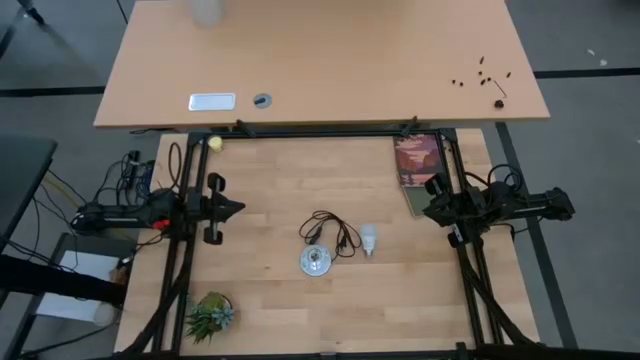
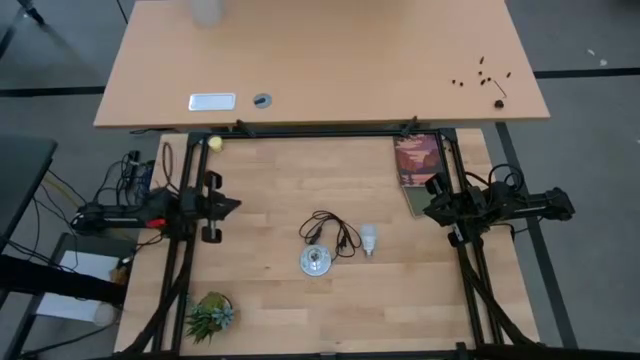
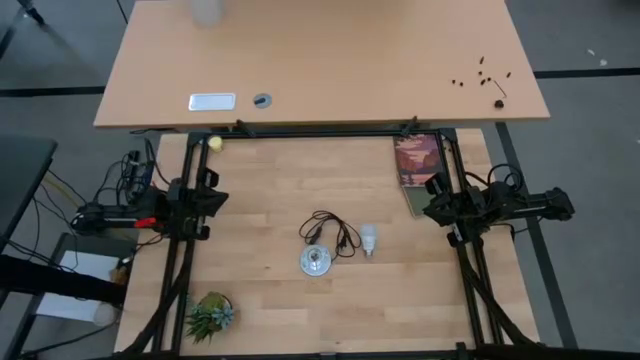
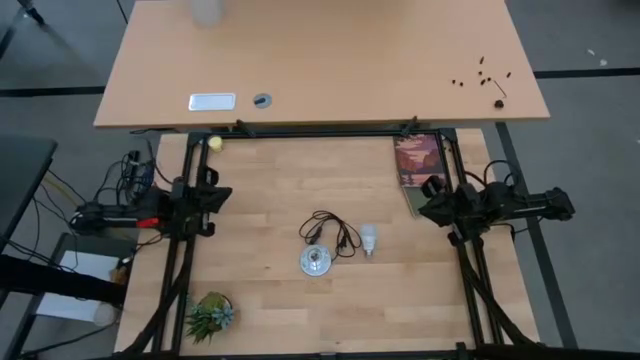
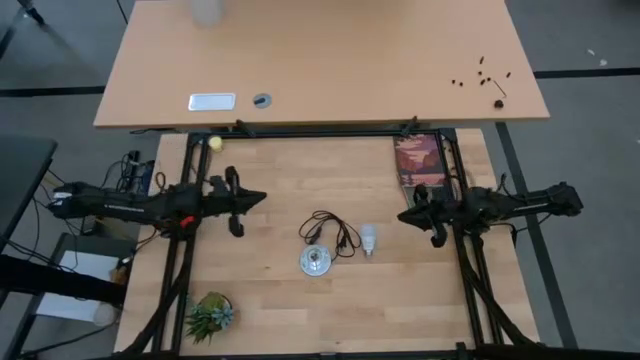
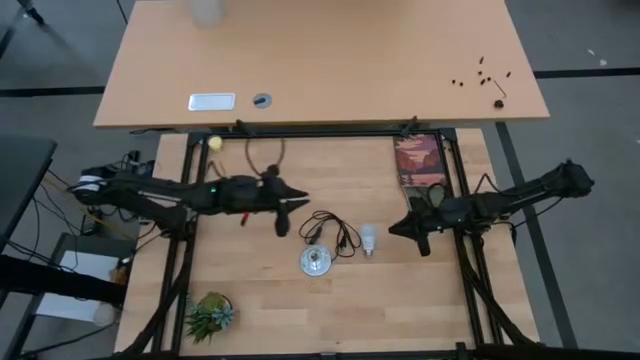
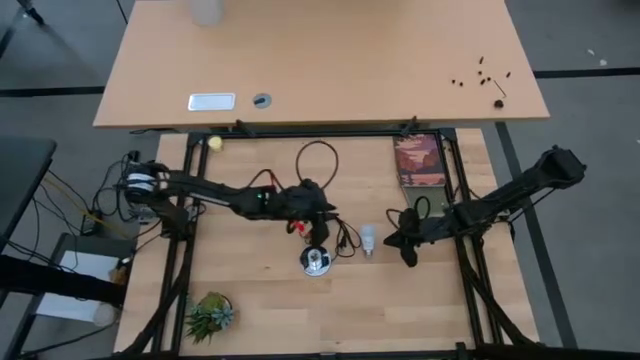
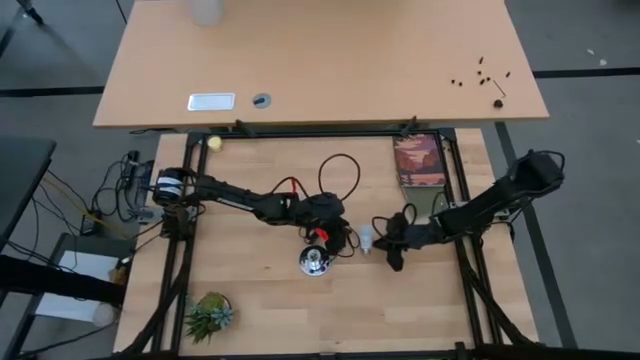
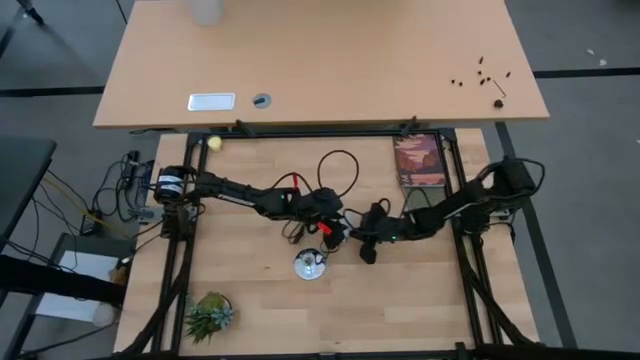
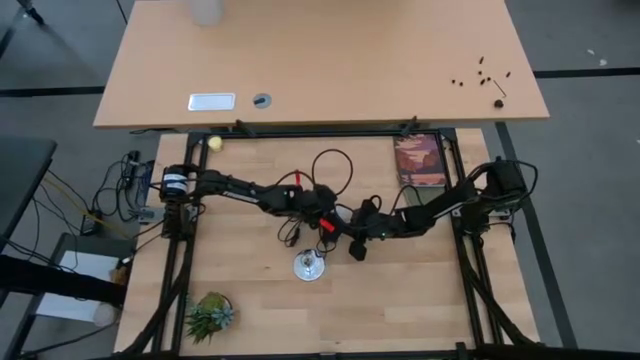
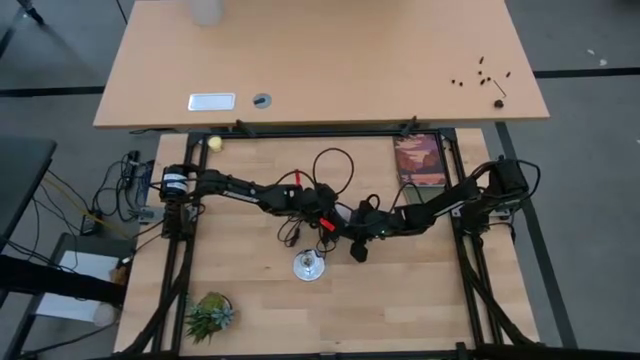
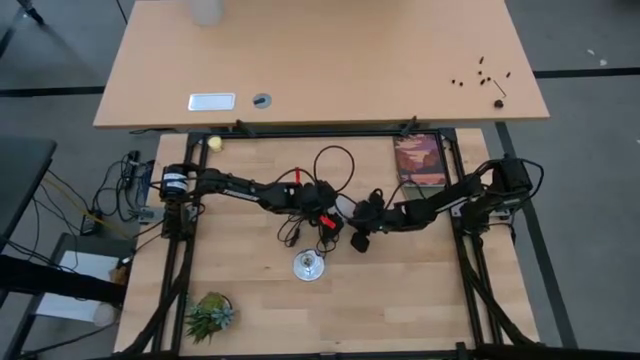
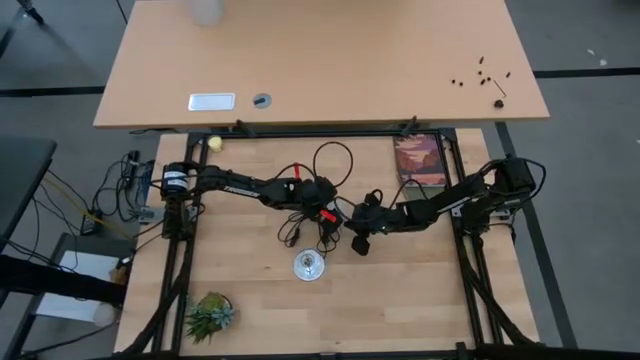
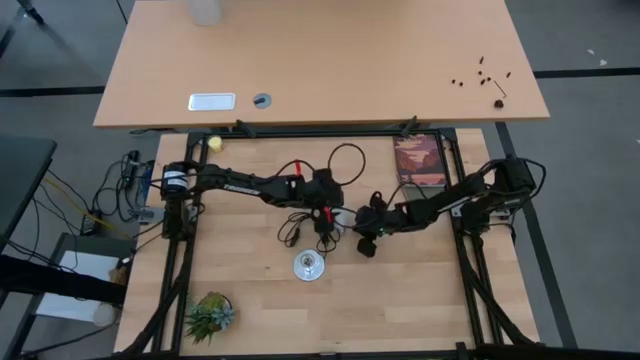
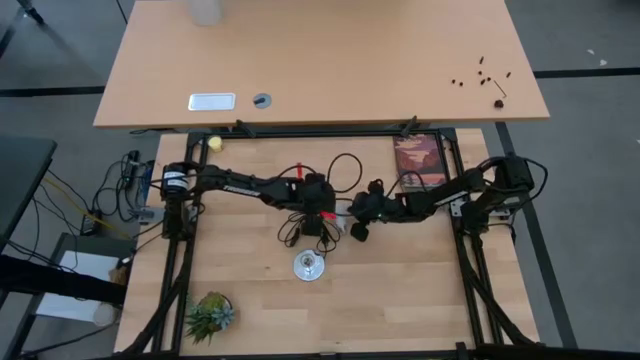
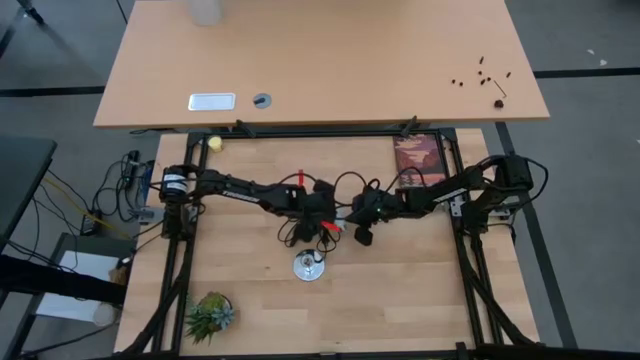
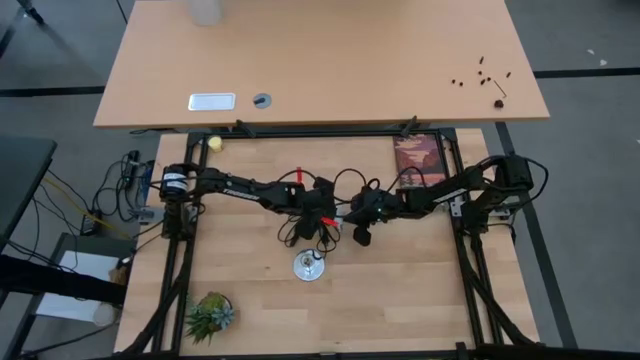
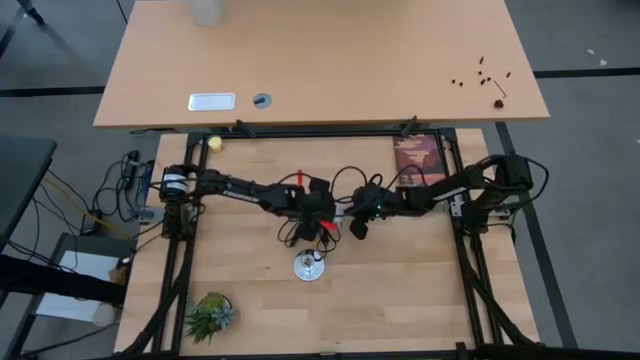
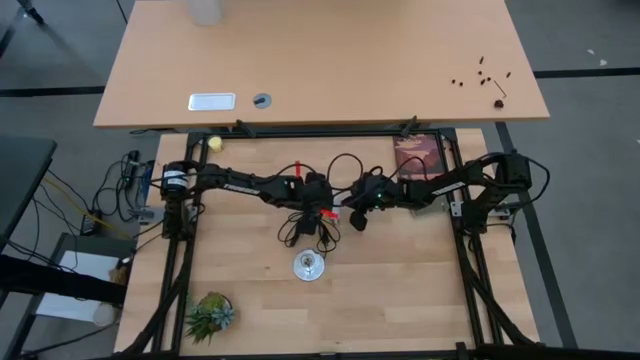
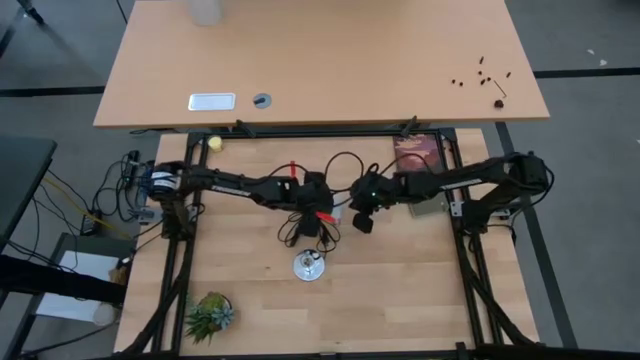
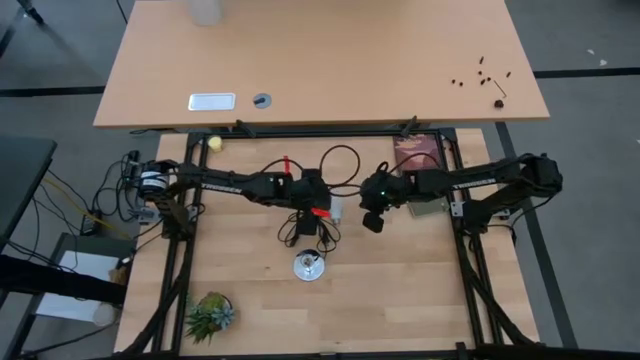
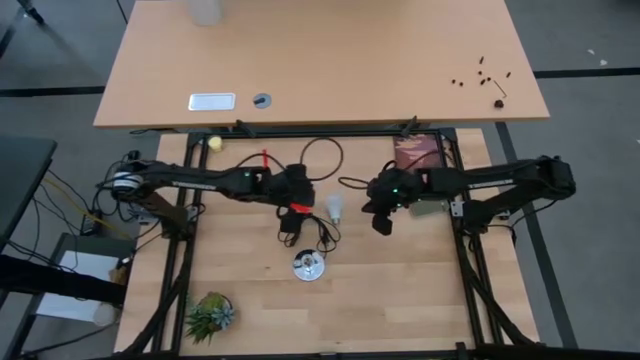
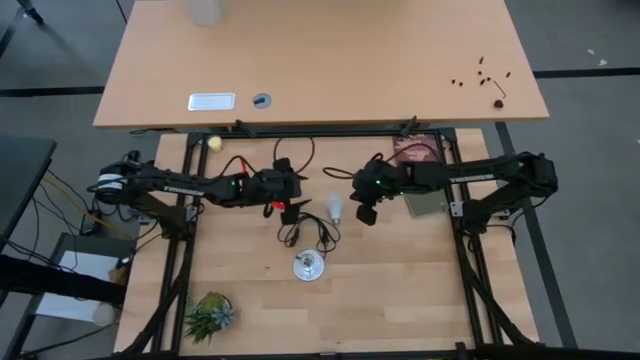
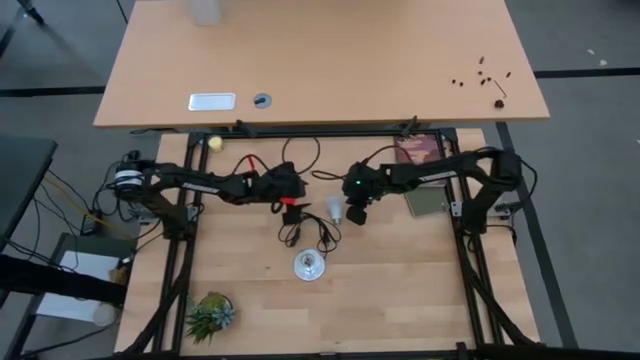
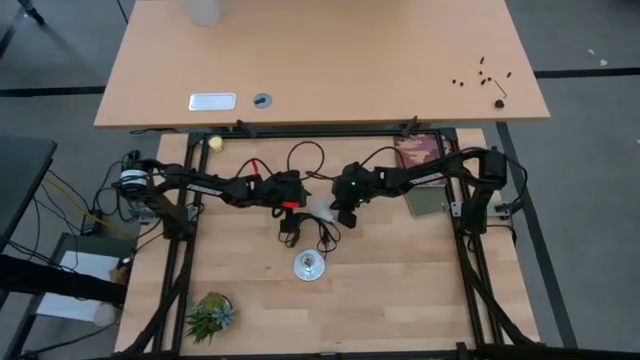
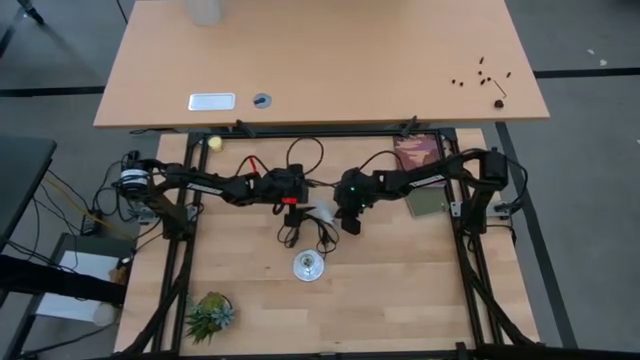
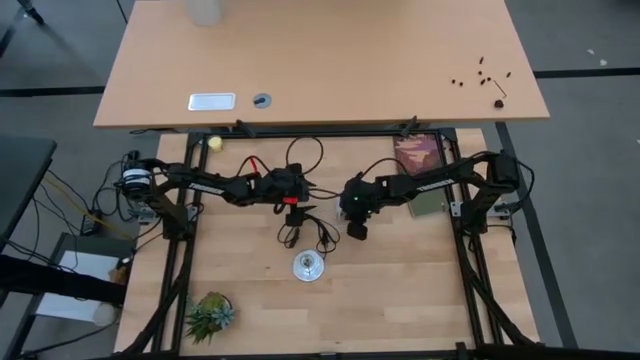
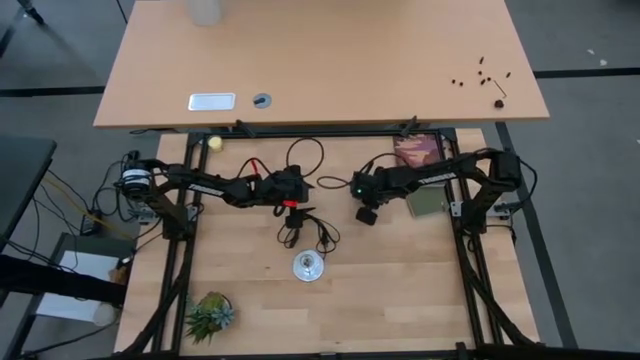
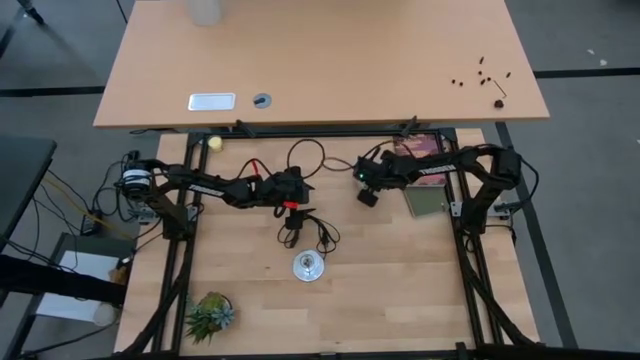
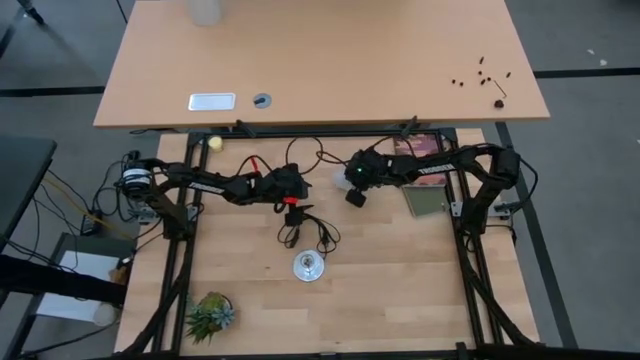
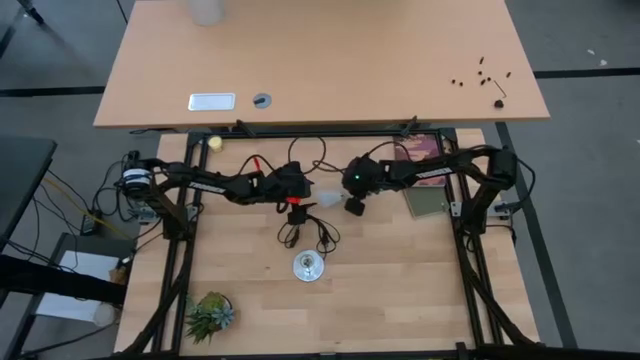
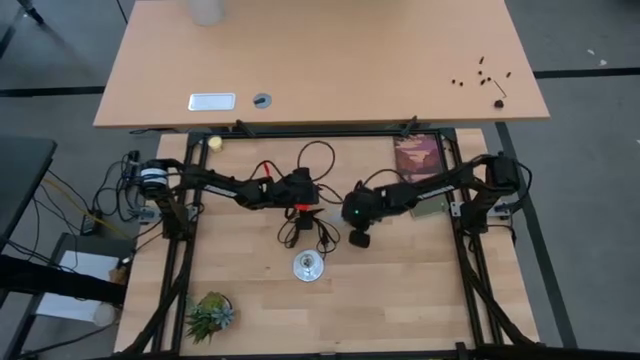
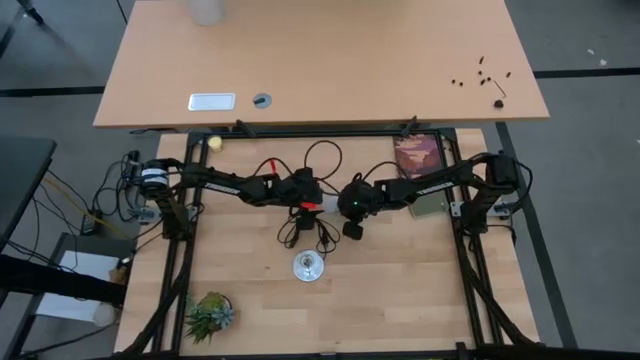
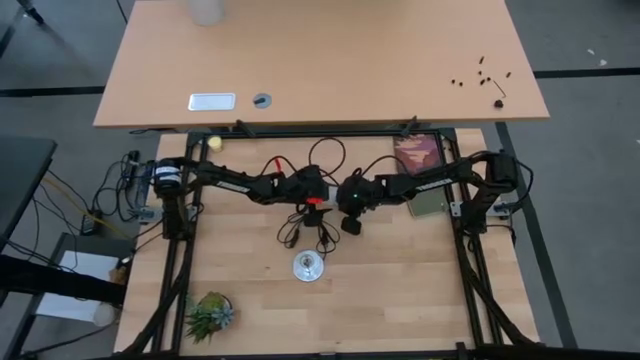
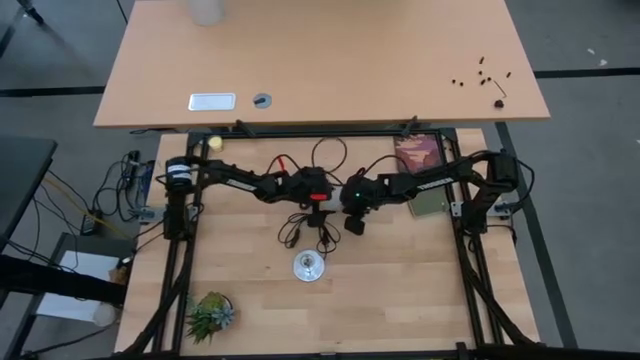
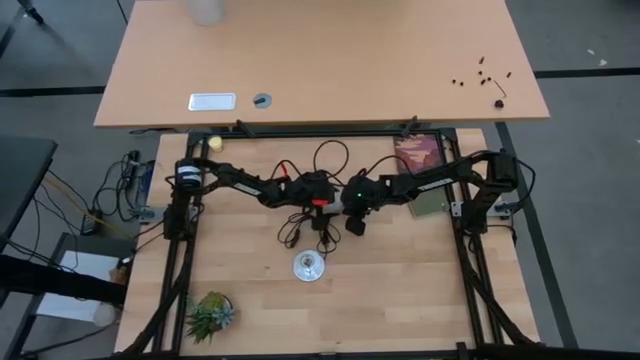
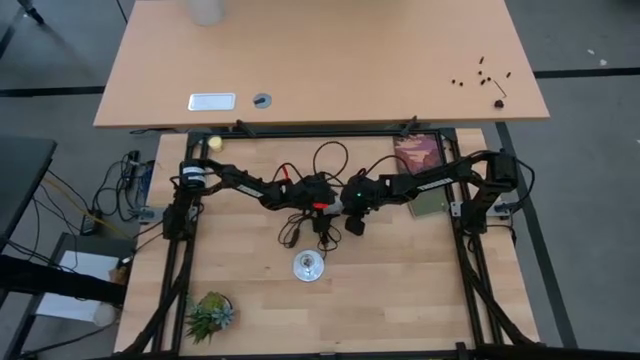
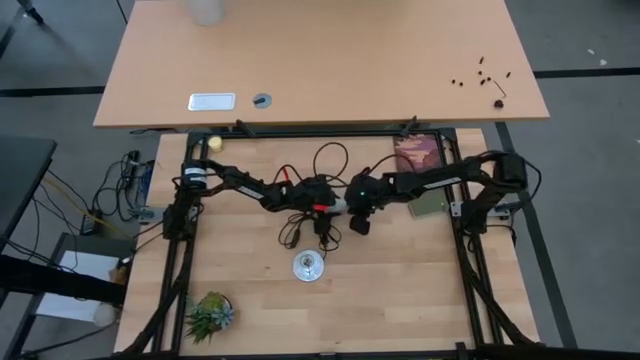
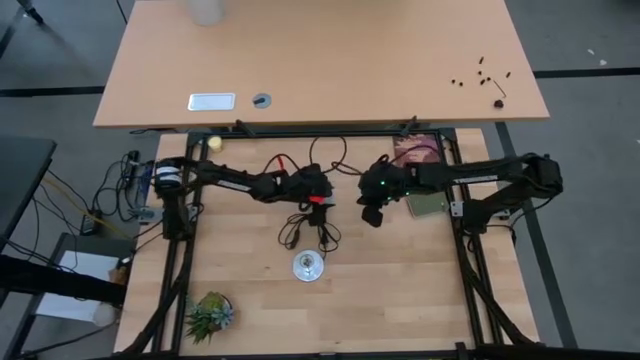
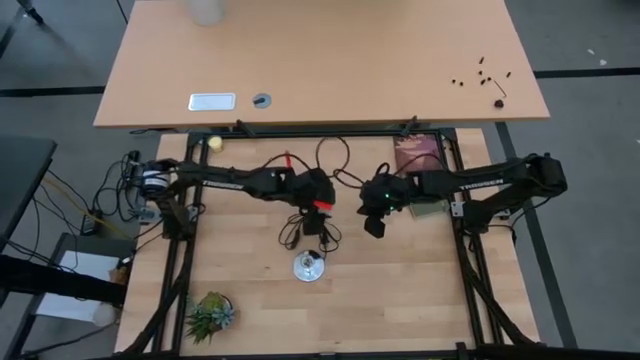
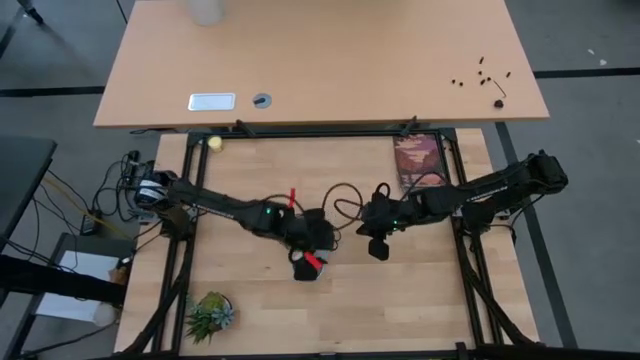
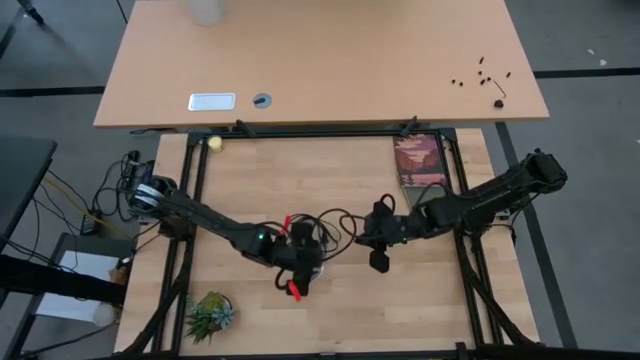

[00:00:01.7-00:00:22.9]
Task: Screw lightbulb
Insert the lightbulb into the silver lamp
